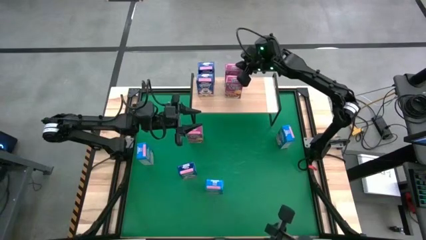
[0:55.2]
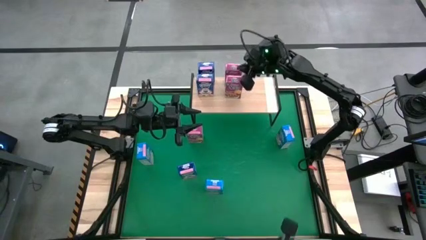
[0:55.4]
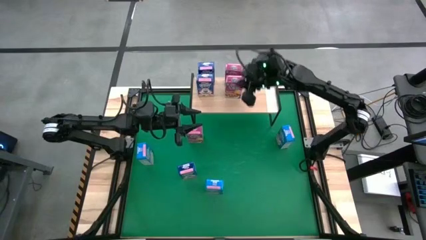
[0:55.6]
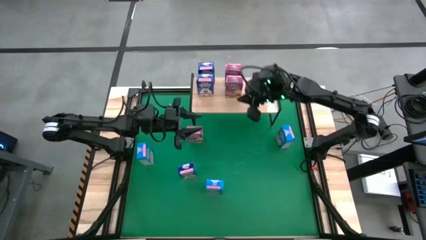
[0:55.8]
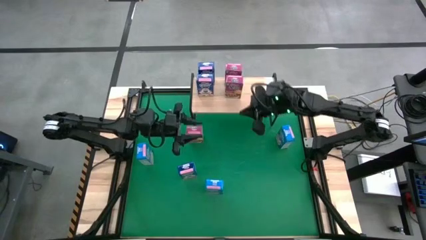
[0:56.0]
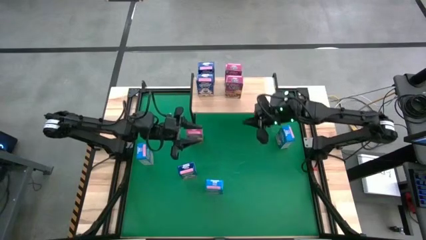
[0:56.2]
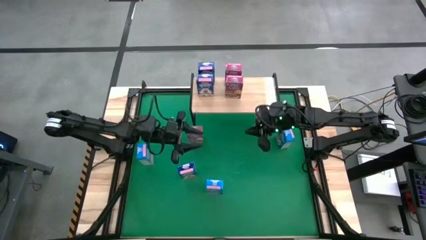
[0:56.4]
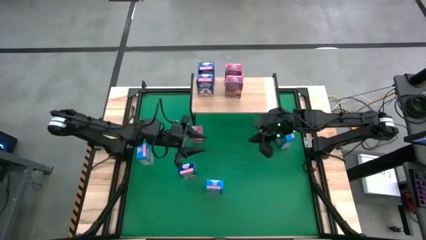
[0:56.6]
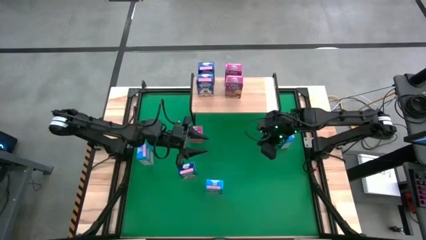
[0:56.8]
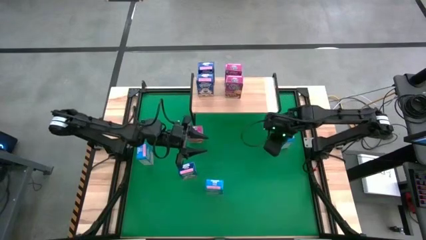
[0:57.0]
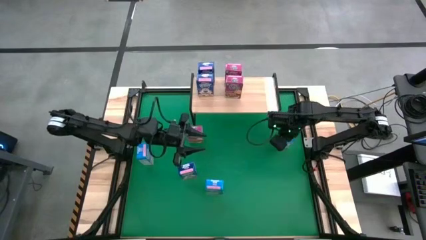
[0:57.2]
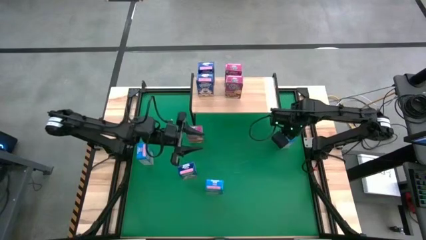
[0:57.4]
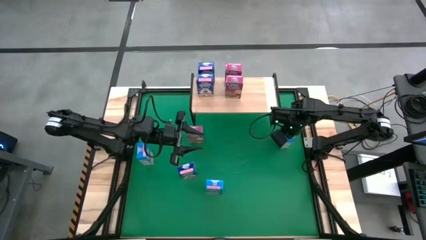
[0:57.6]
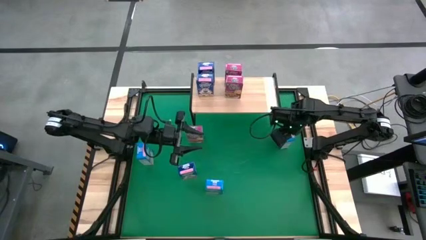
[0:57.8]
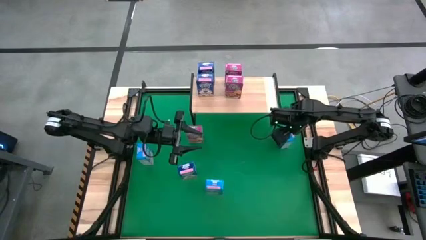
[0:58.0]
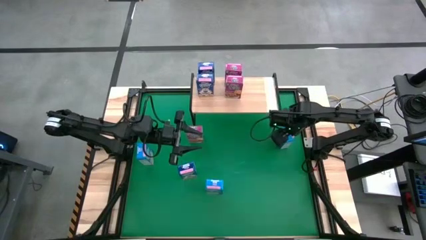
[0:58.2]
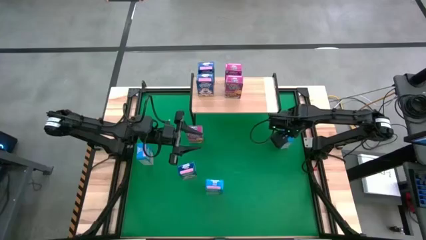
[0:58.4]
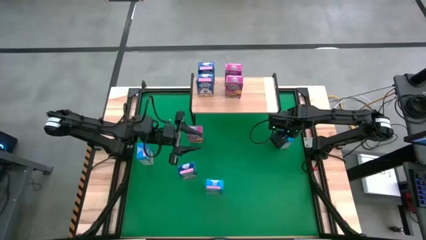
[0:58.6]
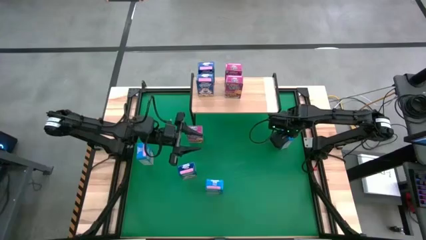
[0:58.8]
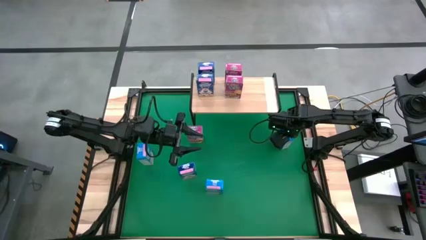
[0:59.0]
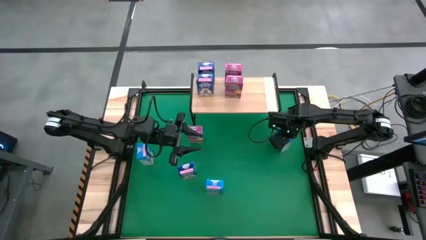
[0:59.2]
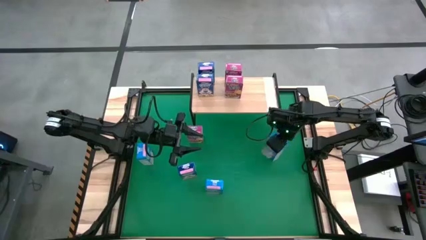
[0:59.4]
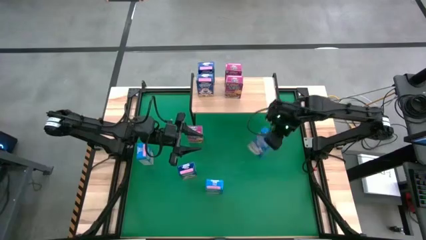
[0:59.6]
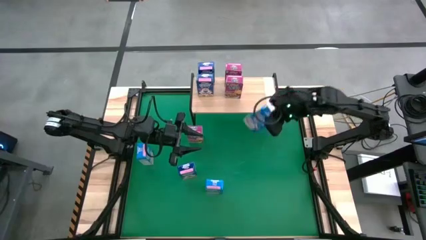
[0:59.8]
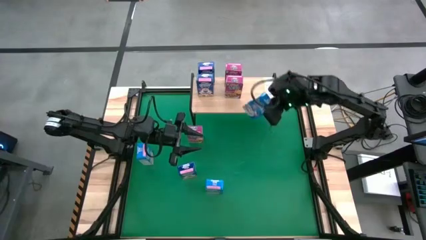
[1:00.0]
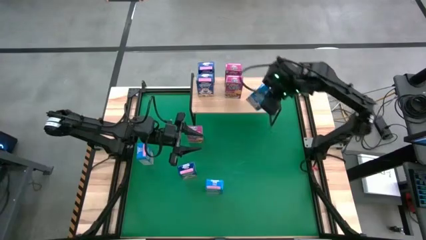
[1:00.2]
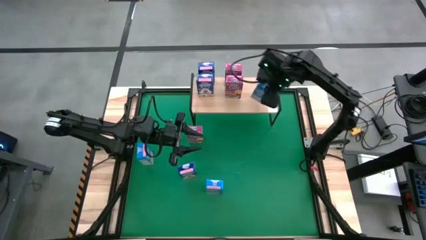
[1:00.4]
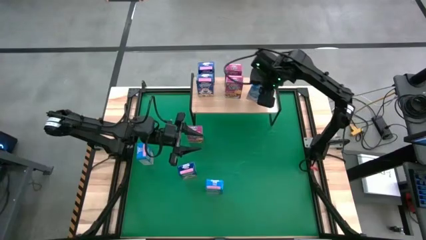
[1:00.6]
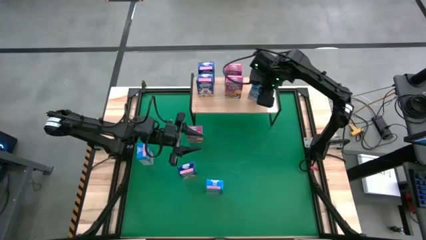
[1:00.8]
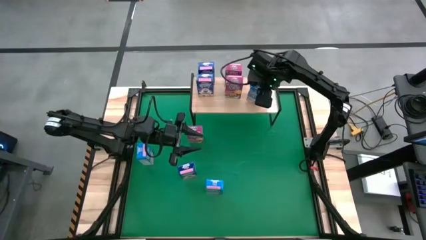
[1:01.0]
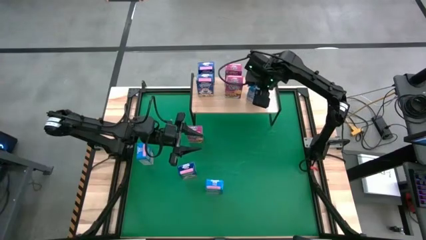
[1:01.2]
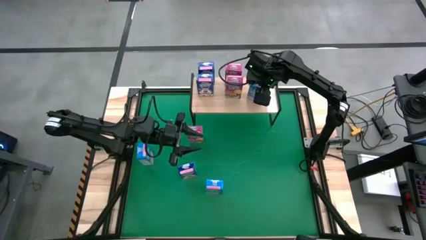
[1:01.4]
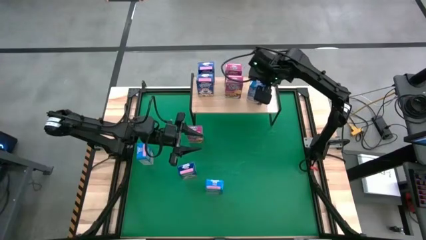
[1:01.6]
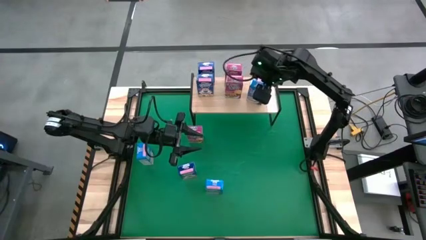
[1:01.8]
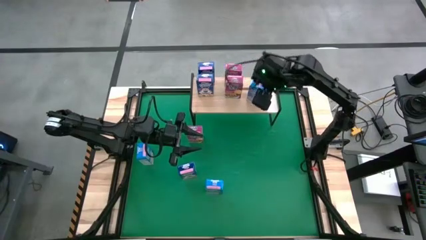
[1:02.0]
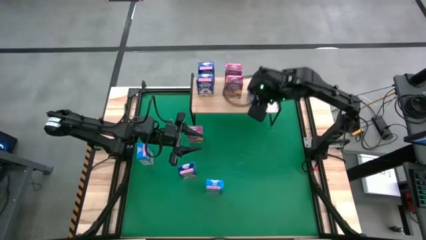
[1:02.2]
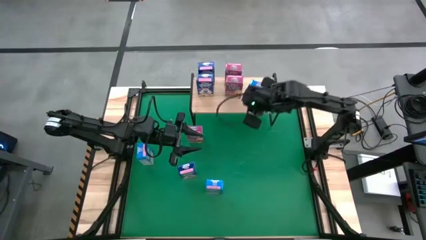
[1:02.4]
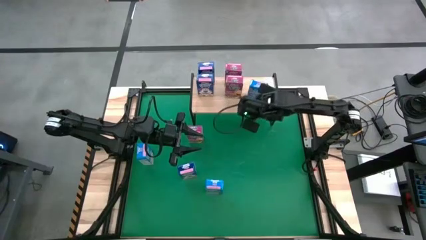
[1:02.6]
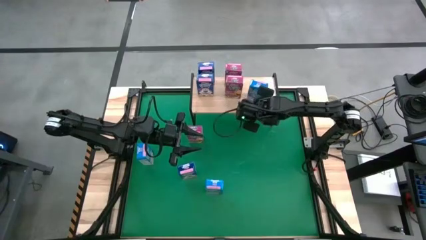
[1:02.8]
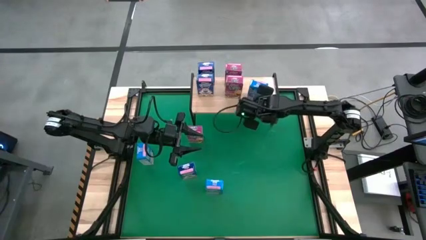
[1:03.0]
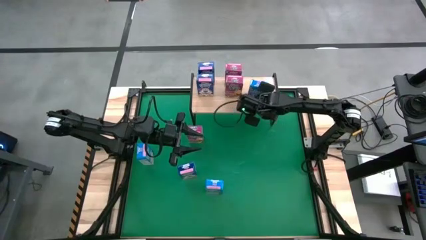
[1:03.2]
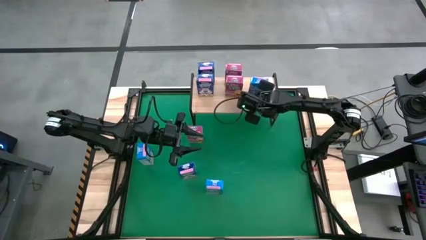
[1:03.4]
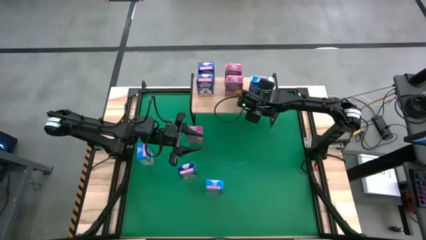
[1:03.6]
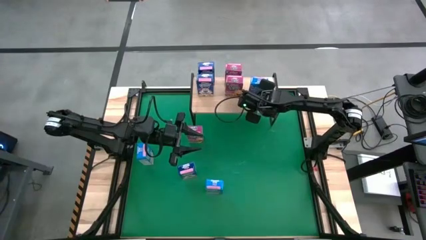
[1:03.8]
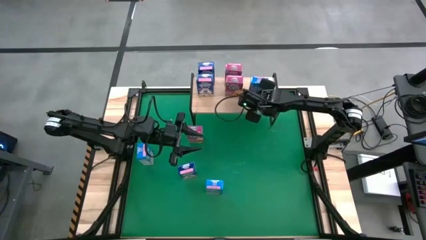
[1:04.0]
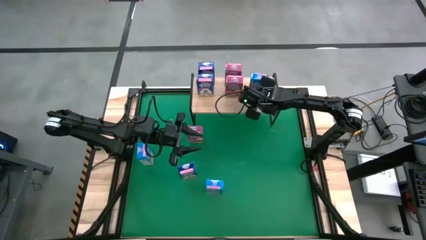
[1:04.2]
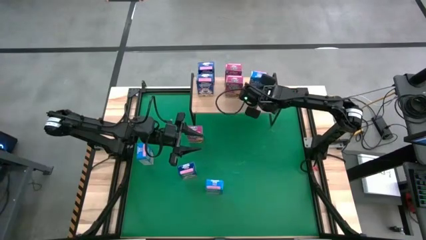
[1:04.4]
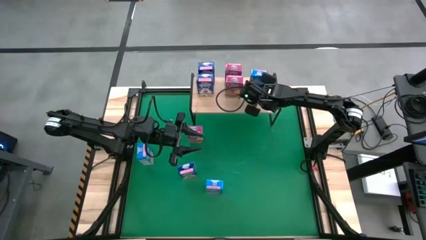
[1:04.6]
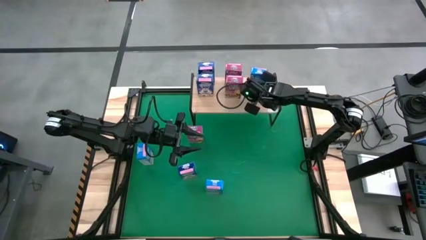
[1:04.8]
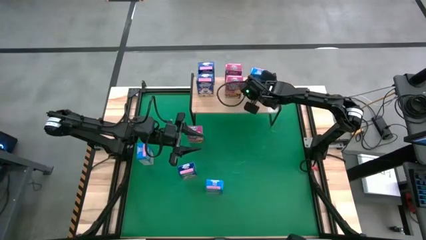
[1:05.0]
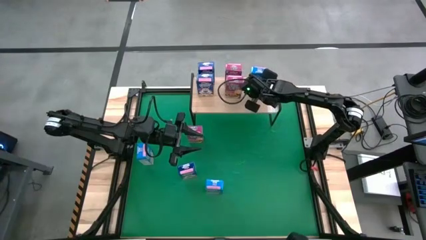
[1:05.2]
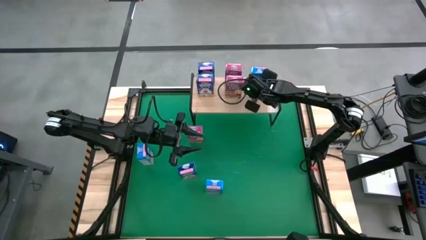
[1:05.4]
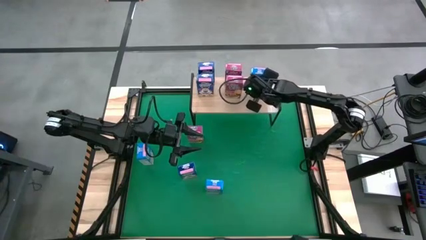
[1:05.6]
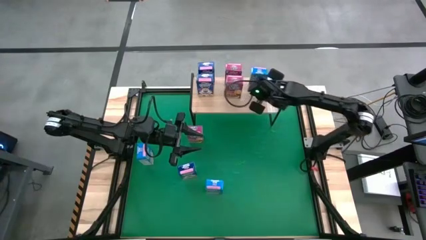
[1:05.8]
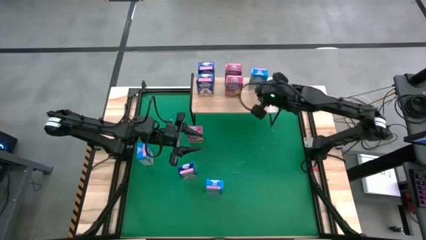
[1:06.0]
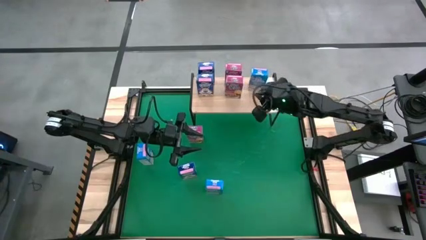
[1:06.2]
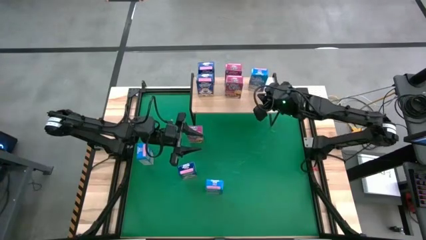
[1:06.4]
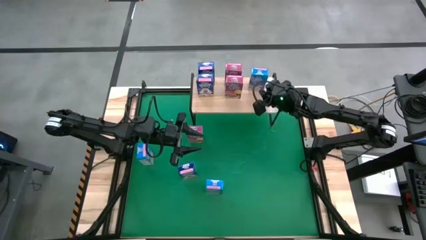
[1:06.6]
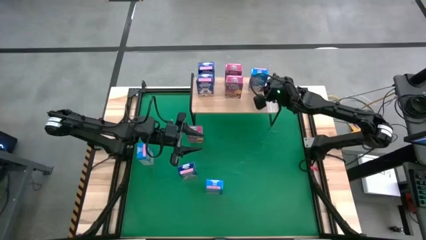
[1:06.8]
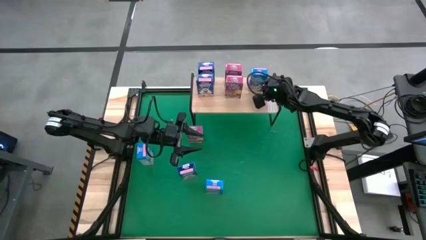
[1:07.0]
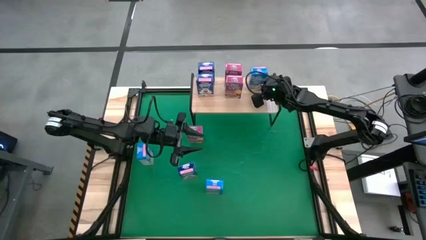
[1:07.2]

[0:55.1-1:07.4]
Task: Stack cereal on shelf
Put the right light blue cereal box on the shelf
